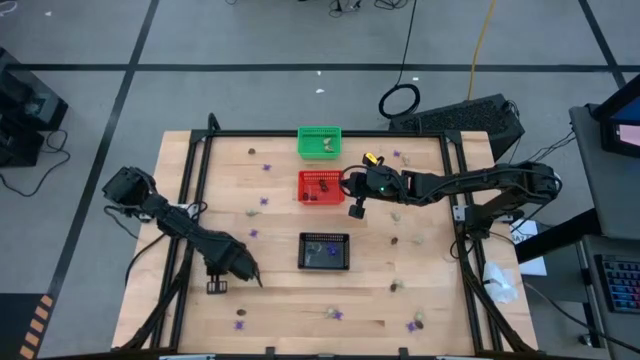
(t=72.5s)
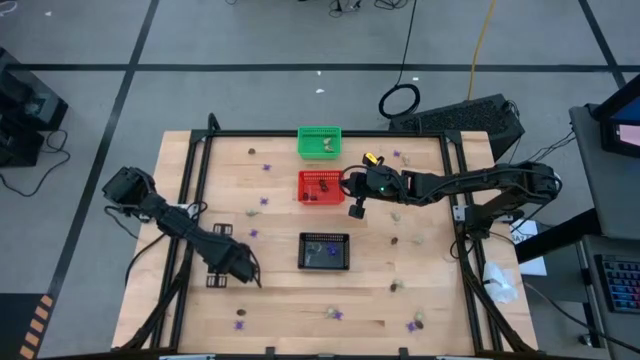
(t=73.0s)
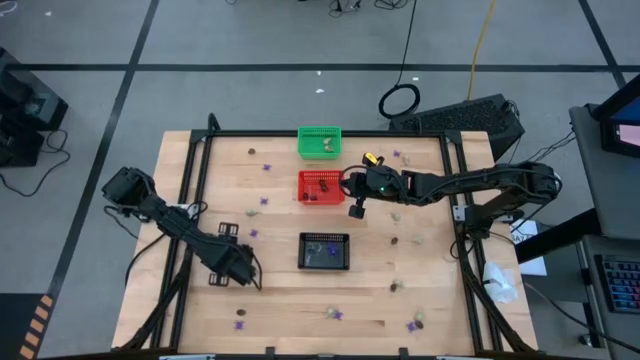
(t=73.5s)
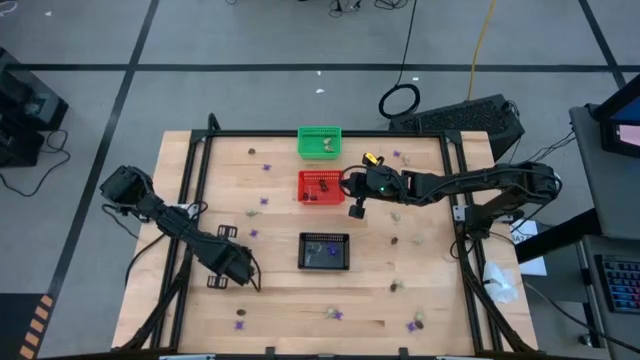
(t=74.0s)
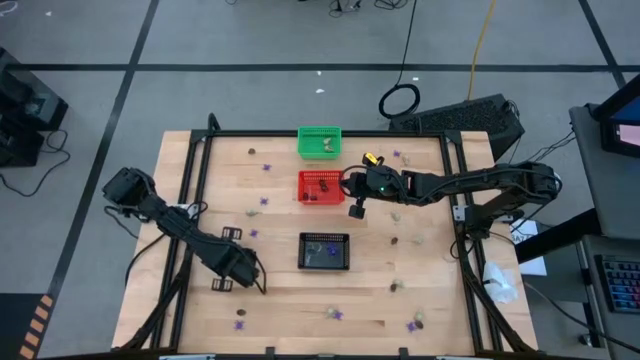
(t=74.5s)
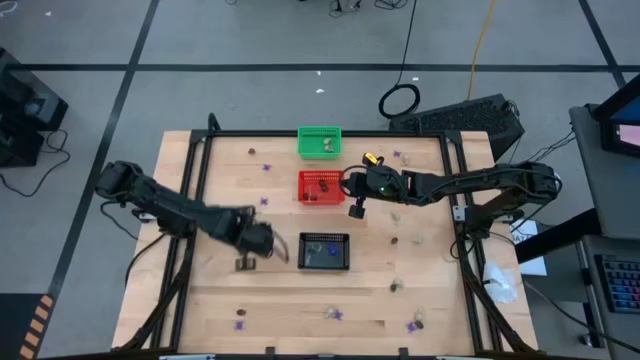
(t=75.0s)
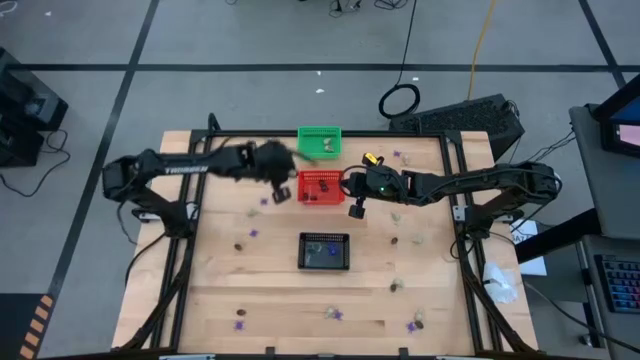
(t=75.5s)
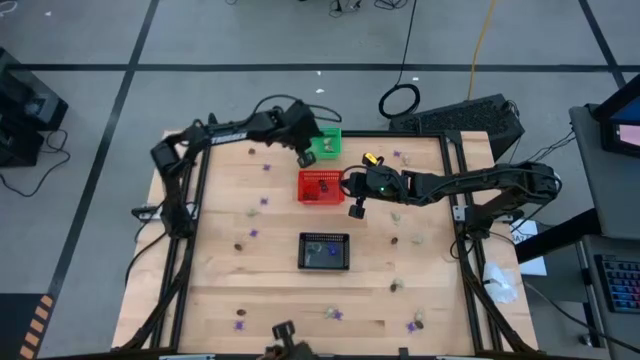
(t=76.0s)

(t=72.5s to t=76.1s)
Task: Sort Halloween decoration
Put the white skull toy into the green basket

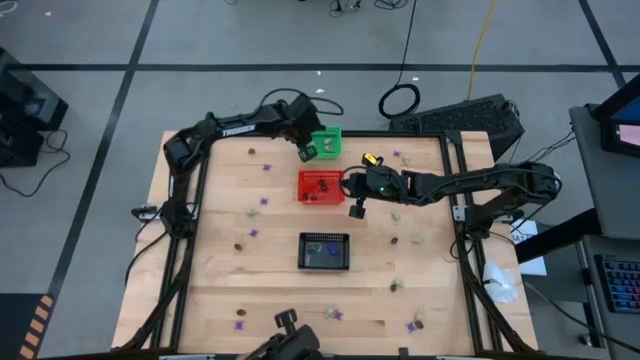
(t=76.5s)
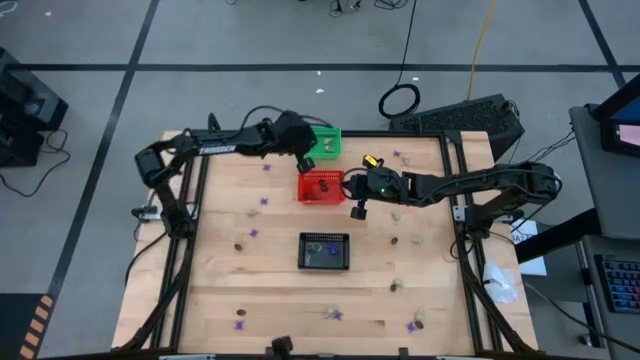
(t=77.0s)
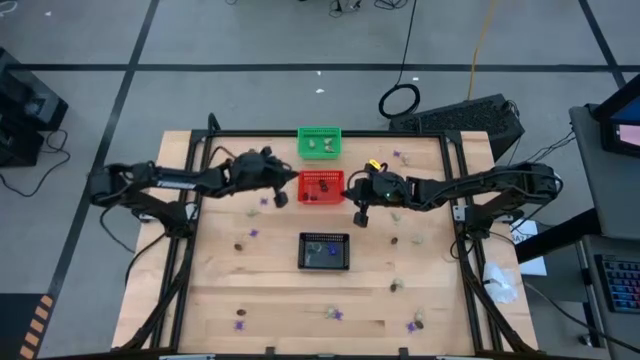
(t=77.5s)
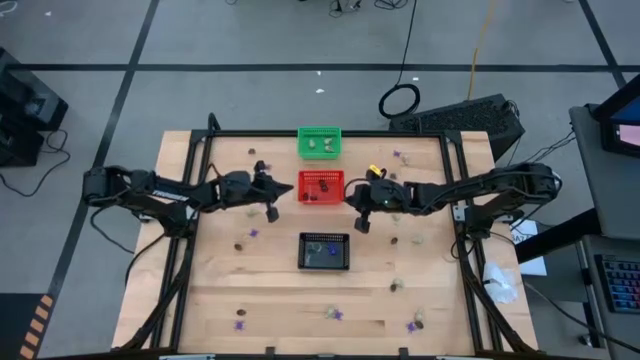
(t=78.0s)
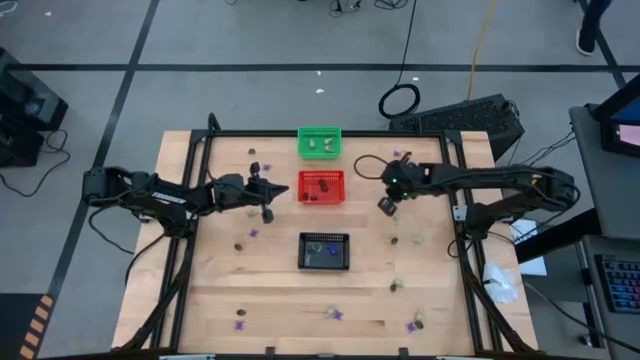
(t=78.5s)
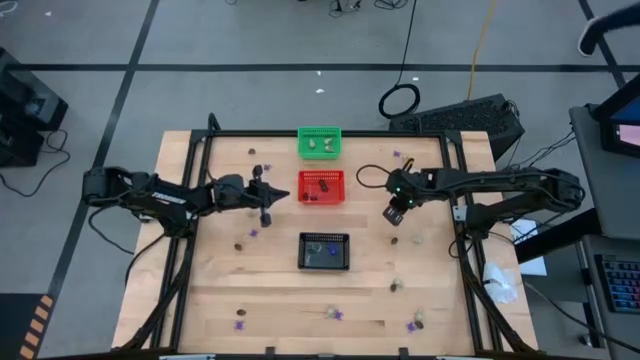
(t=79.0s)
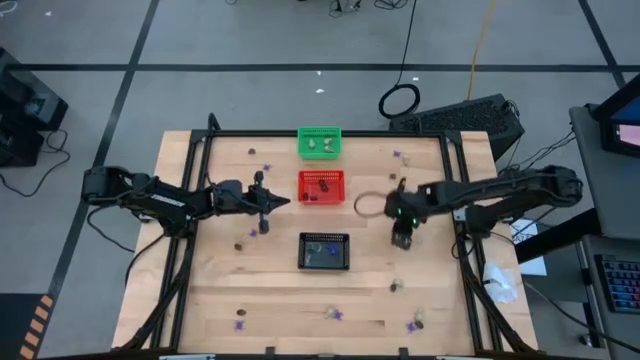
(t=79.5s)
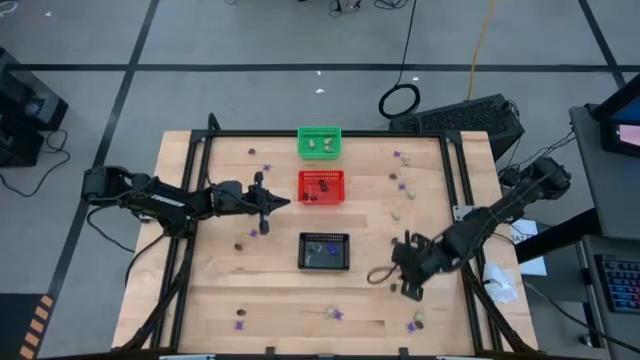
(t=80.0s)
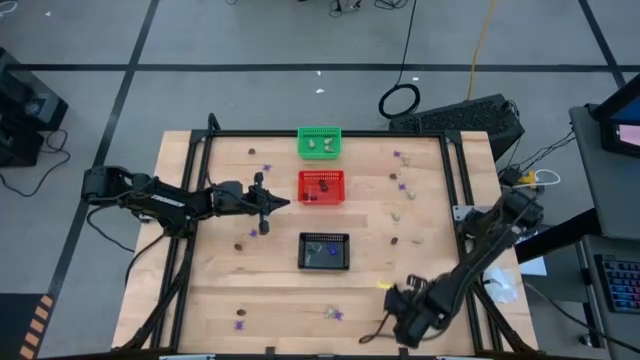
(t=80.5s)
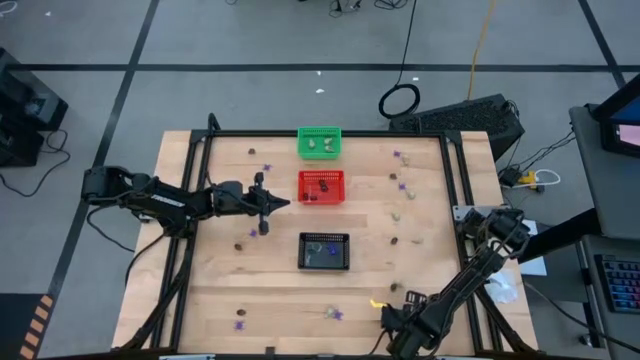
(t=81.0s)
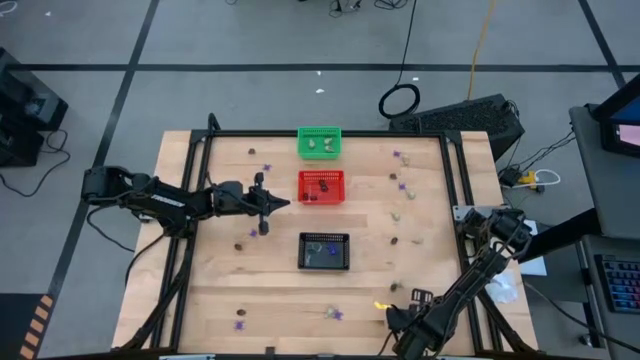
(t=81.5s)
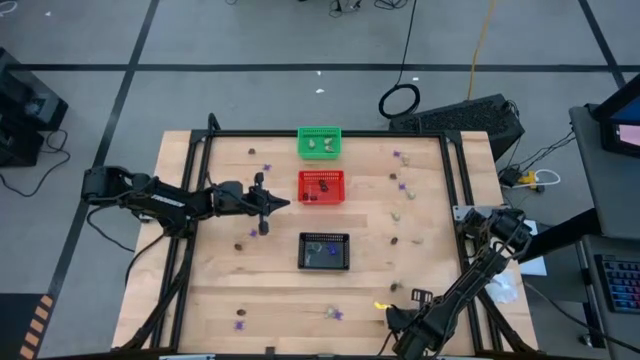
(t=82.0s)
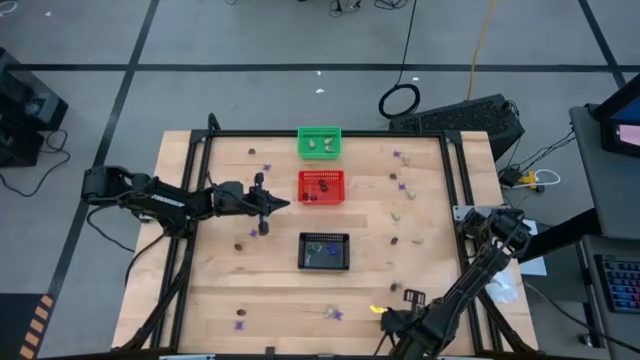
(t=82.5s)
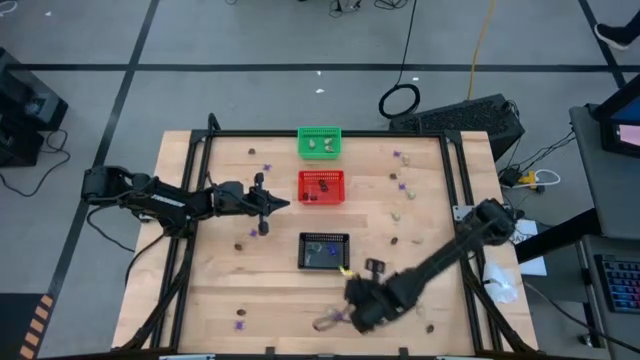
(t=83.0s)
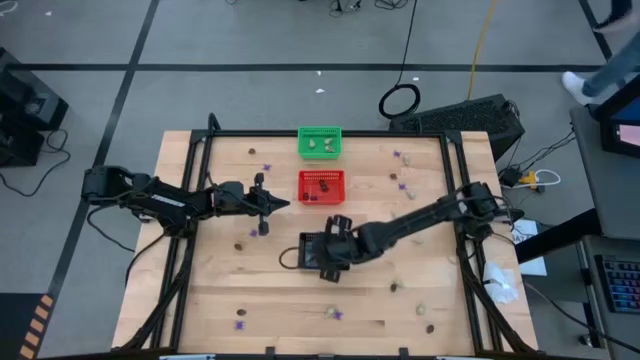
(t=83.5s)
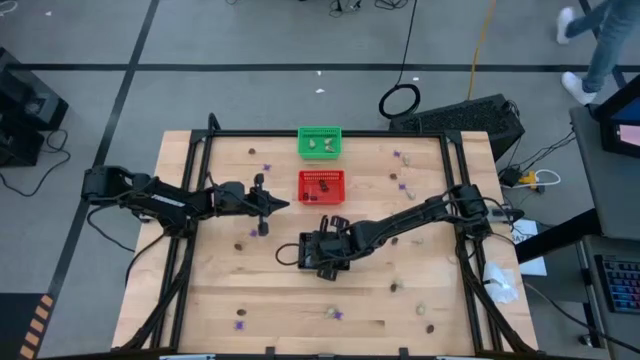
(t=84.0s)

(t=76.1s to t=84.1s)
Put the violet spider toy into the black basket

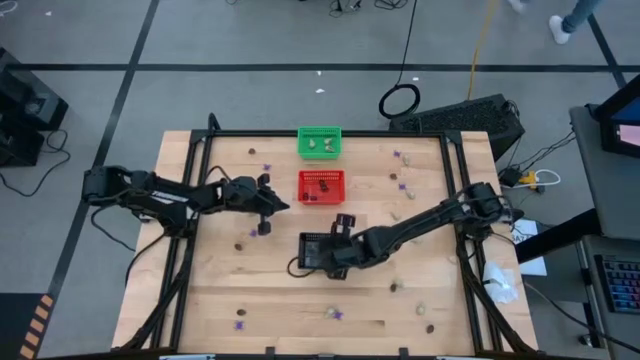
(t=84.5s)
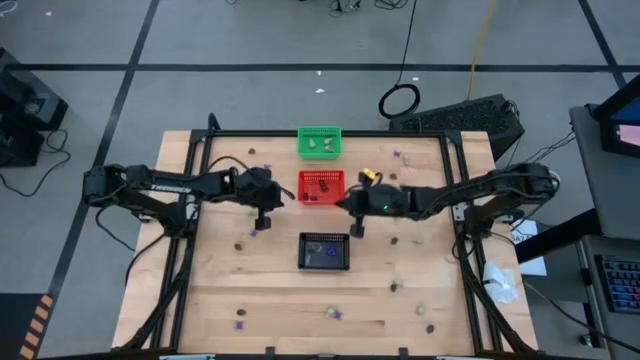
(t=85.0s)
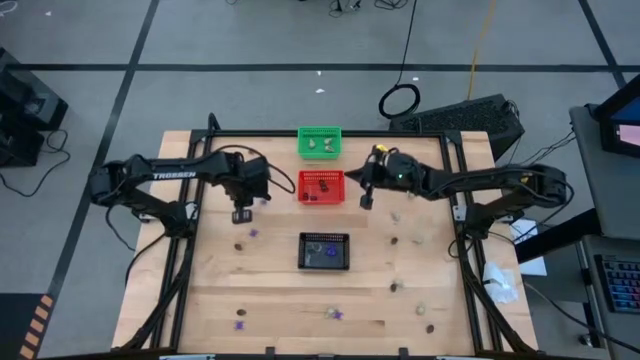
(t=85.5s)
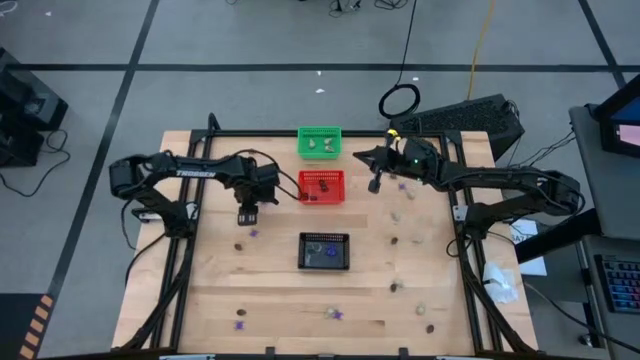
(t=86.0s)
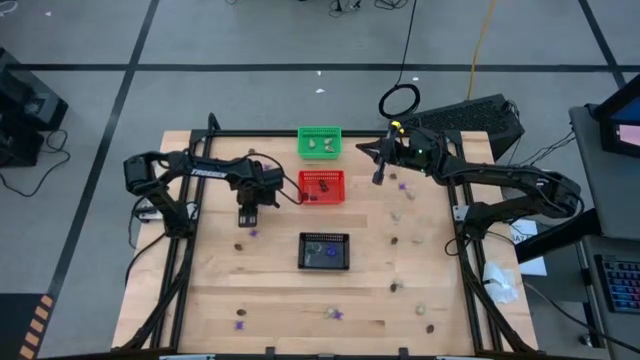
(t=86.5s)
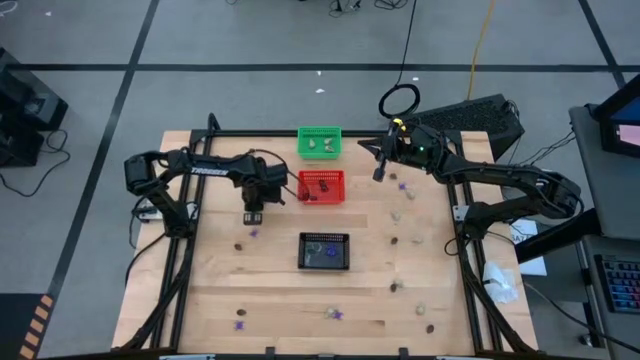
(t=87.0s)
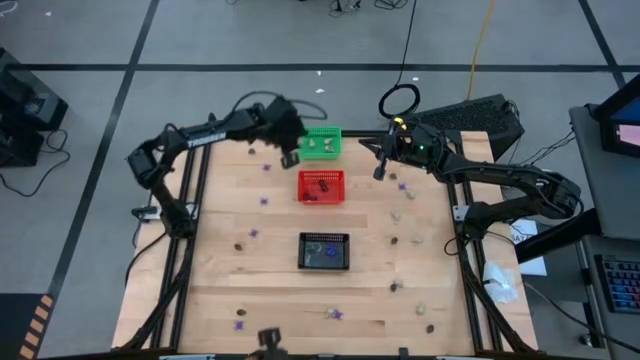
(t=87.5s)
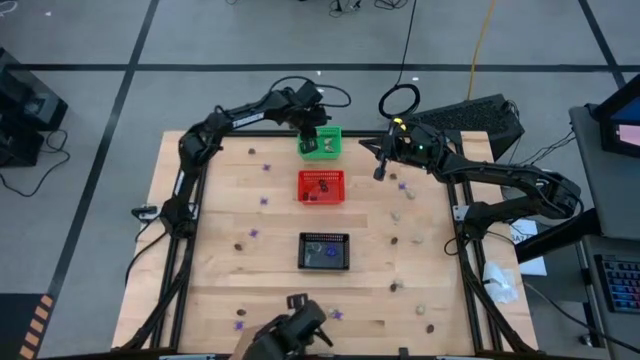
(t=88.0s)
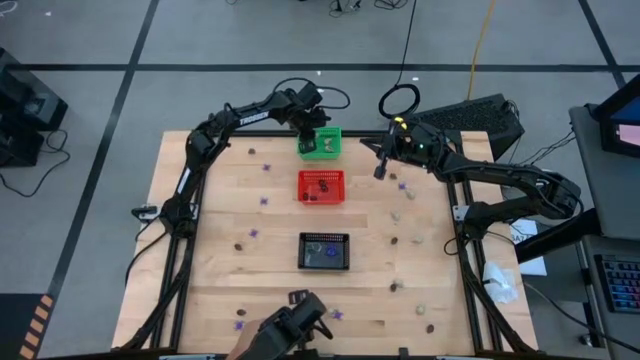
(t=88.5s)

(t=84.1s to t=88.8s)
Put the white skull toy into the green basket

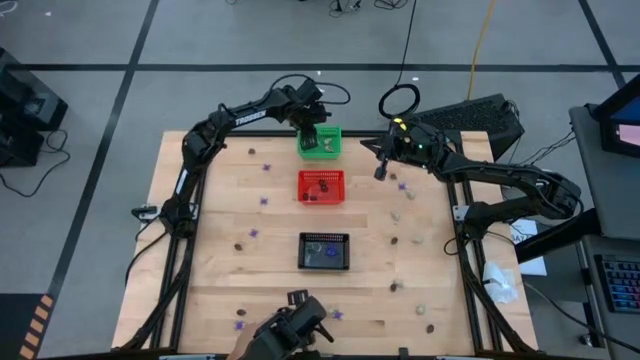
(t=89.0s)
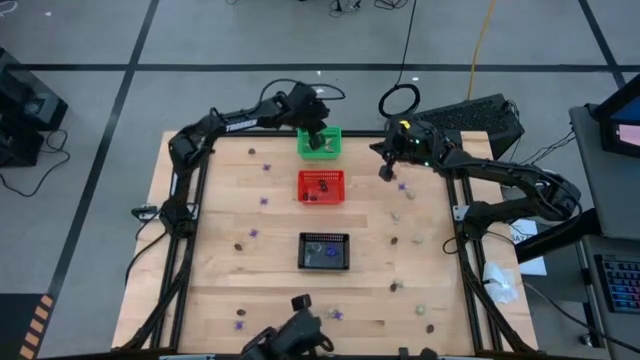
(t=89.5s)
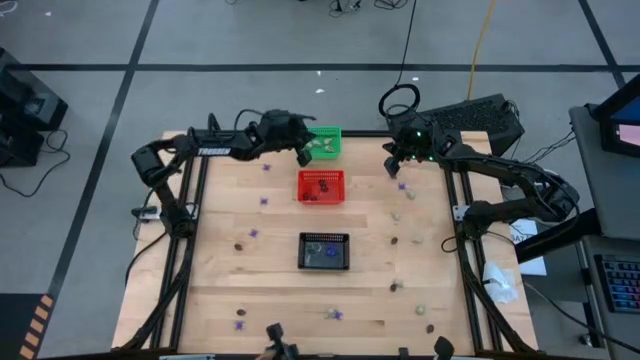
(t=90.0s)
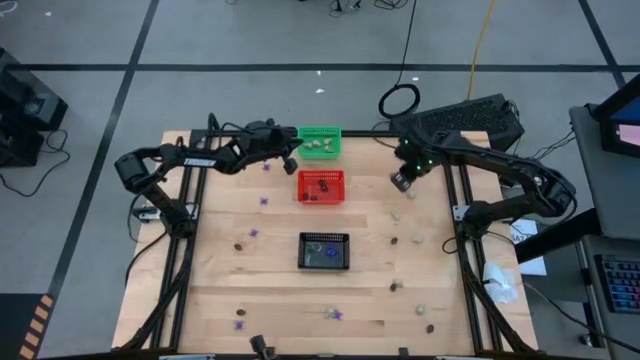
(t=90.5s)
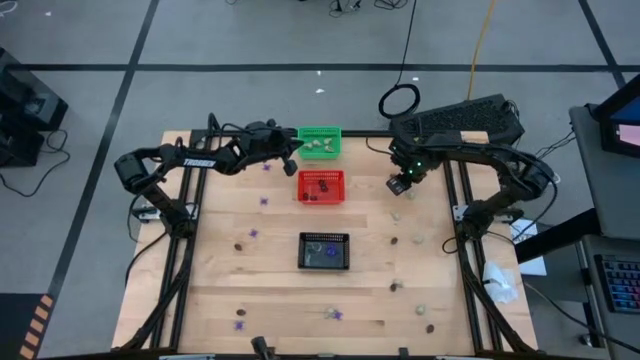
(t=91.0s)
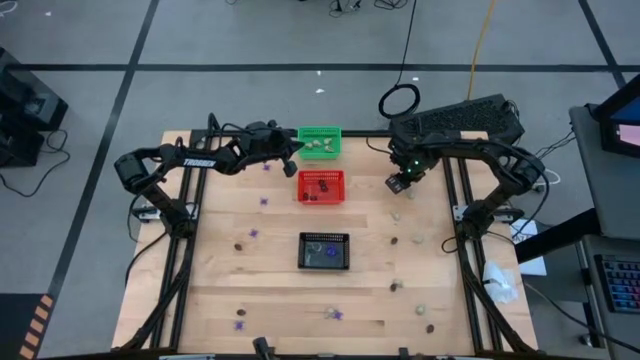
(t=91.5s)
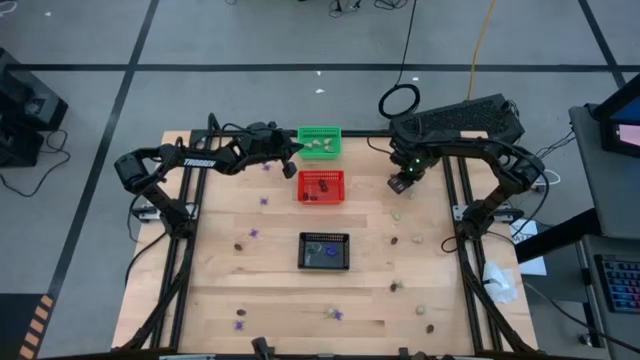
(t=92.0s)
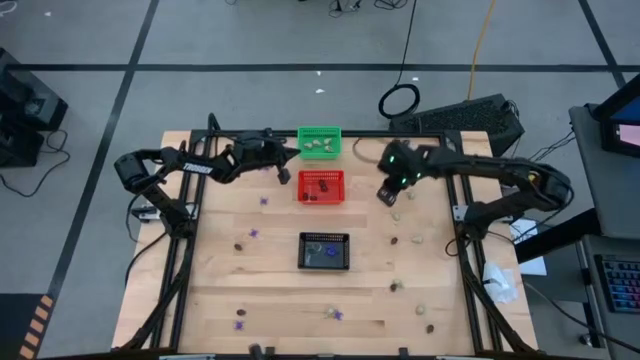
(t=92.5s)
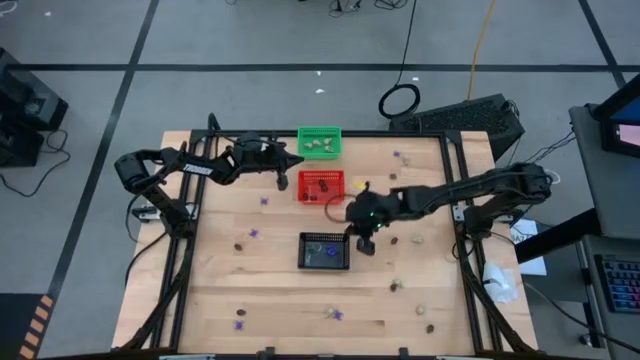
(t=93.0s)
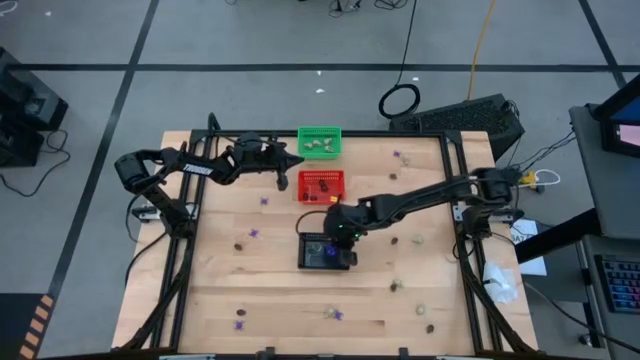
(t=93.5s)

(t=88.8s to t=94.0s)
Put the violet spider toy into the black basket
